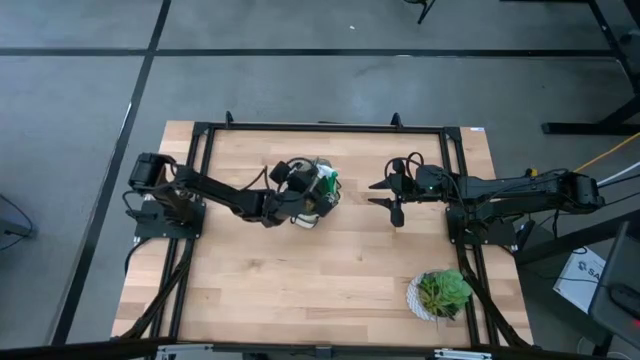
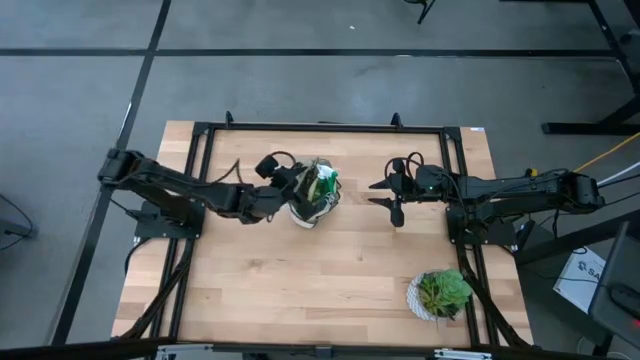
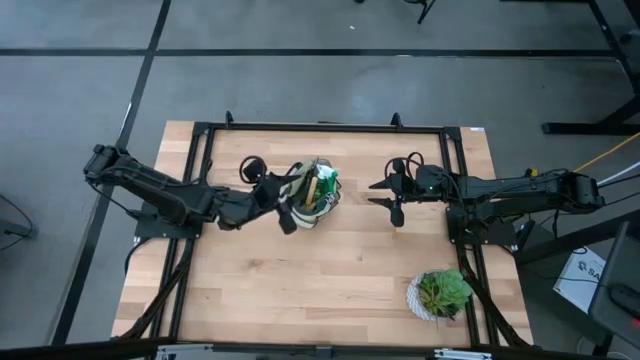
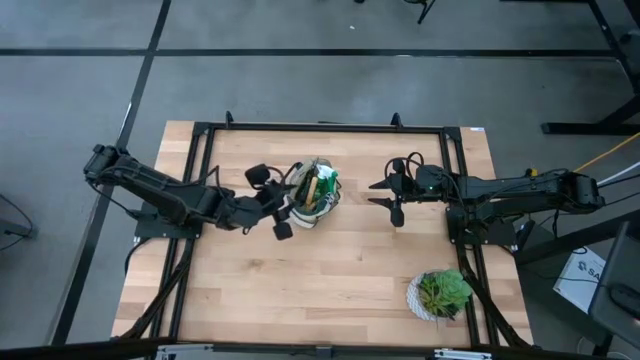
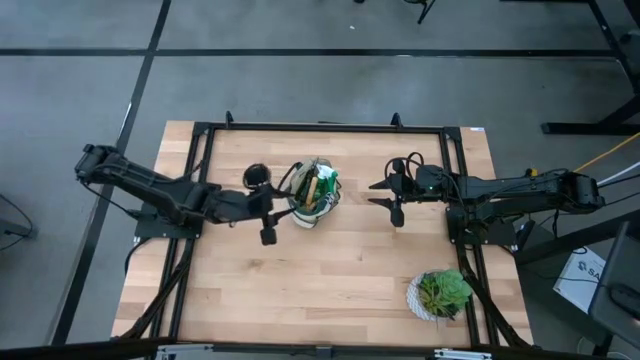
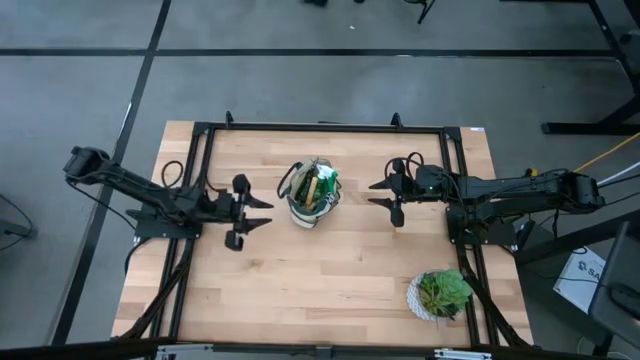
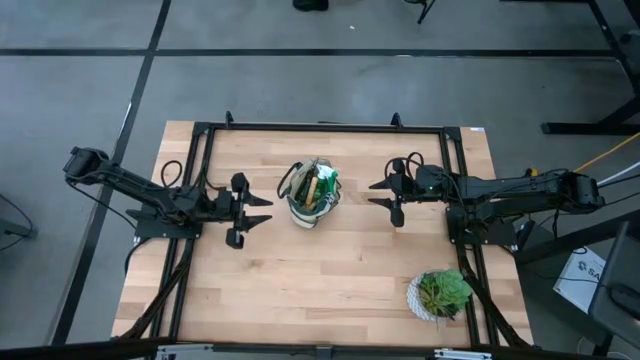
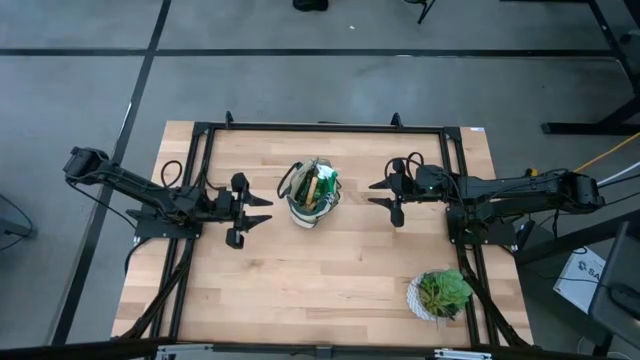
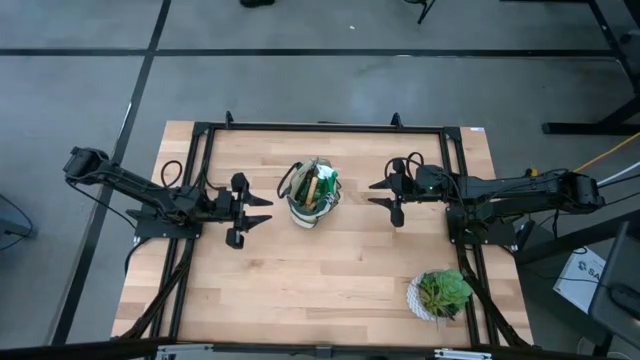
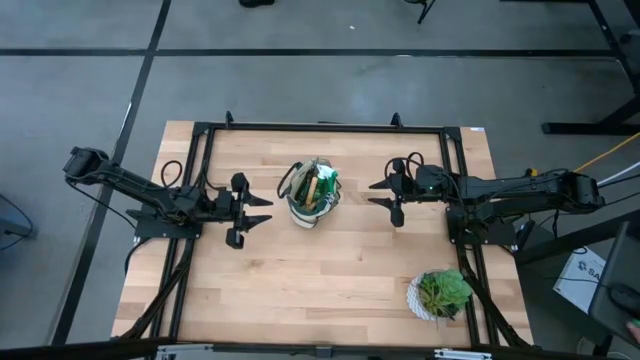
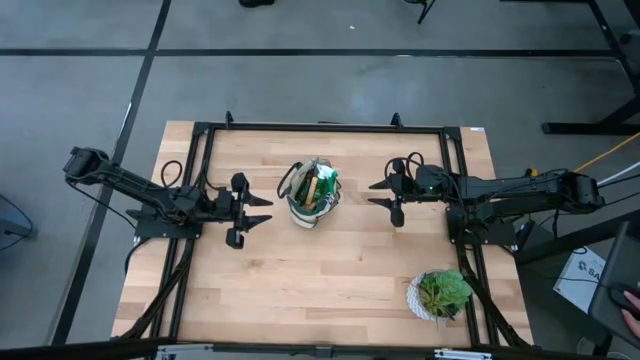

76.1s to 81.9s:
Task: Pick & Place Garden tools in Gardening bag
Return to Home Position

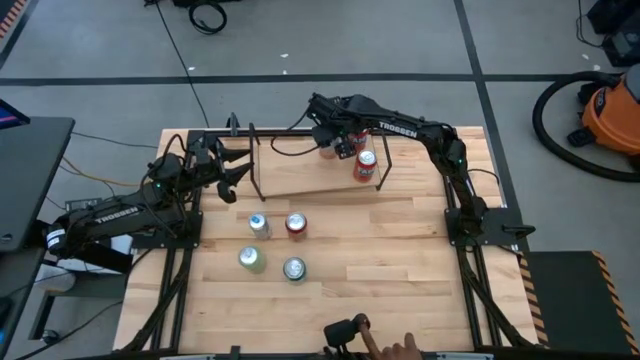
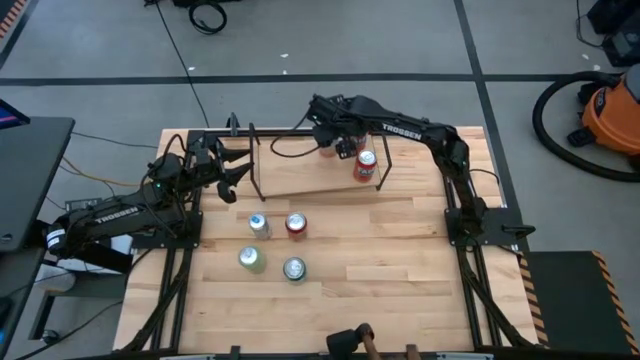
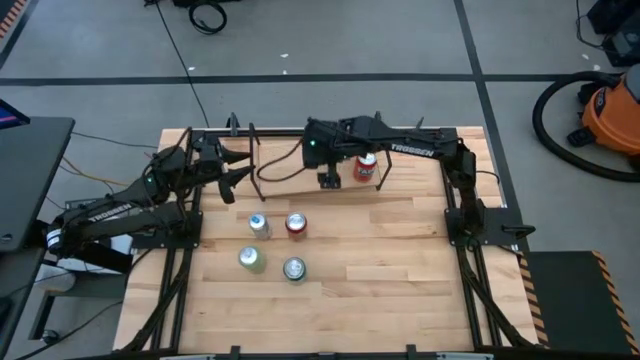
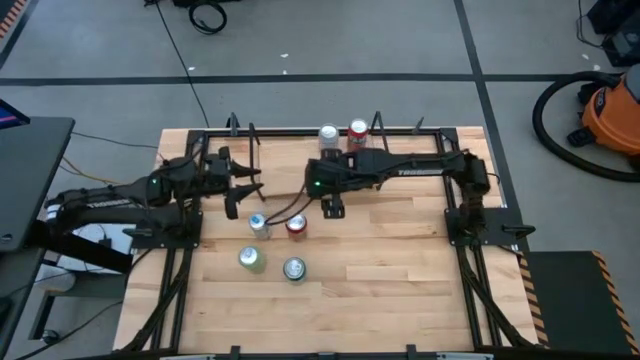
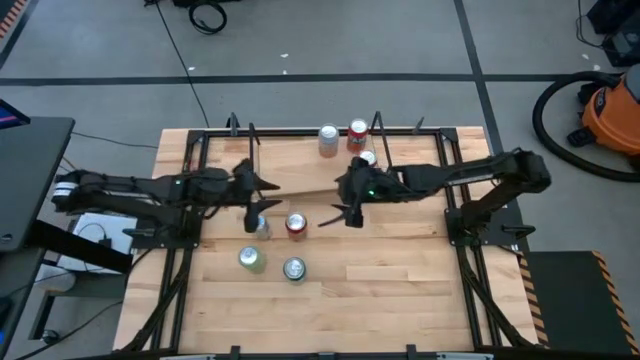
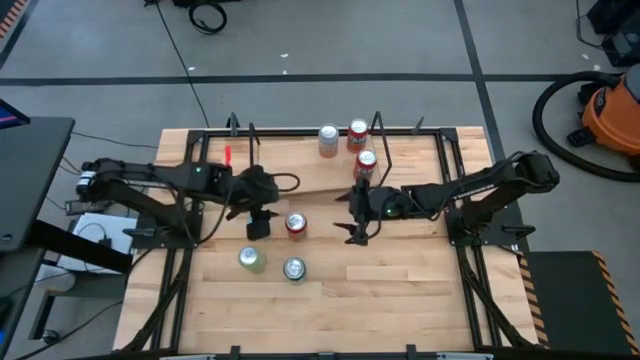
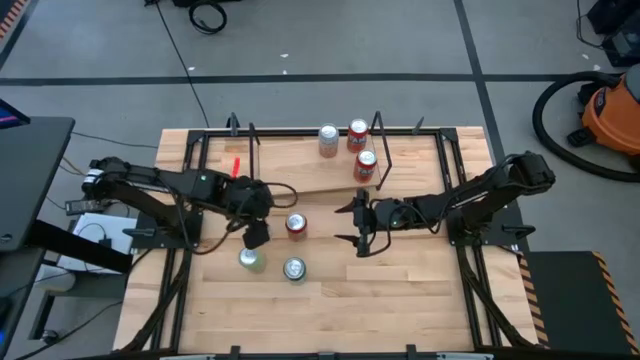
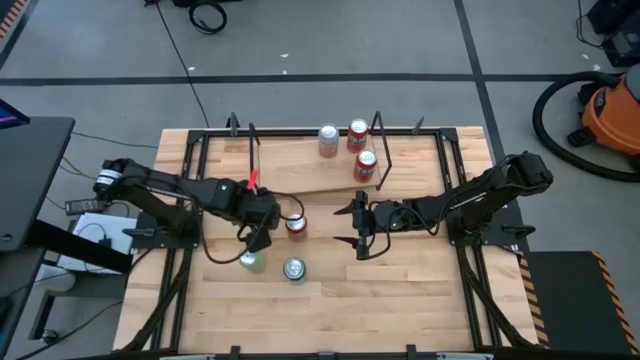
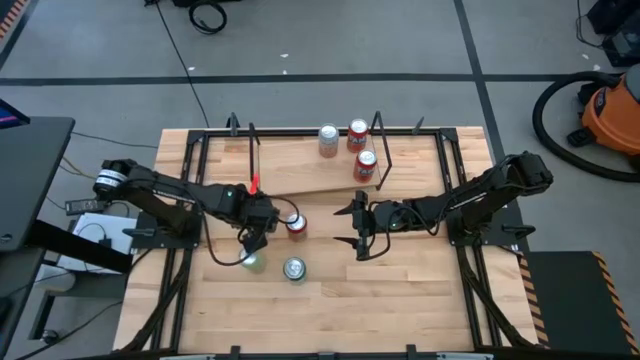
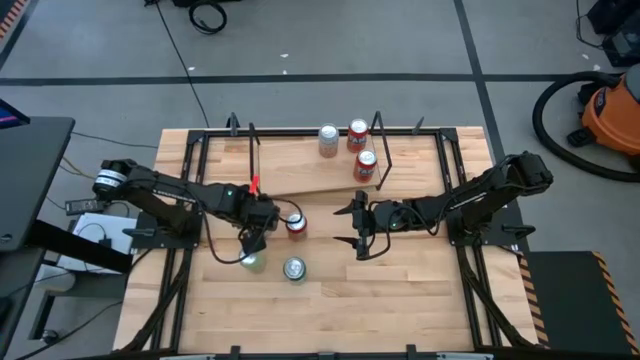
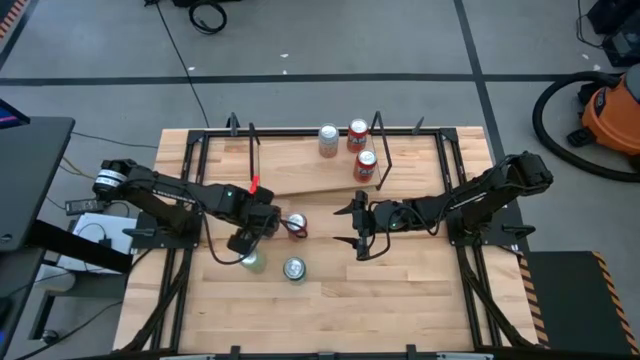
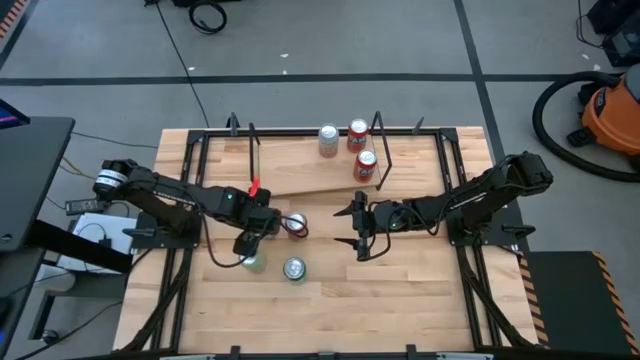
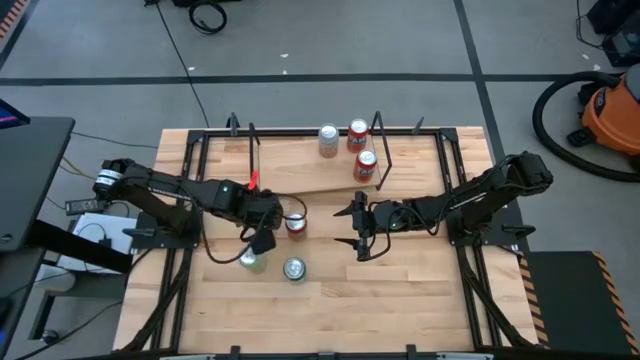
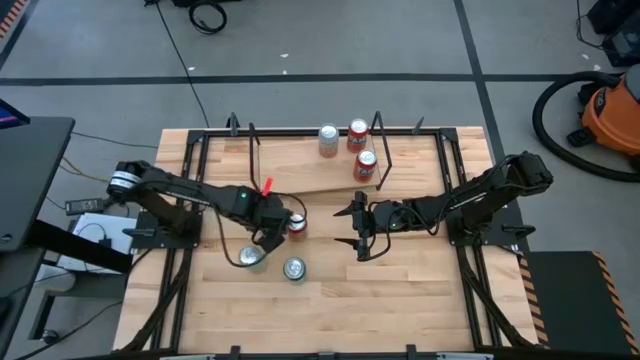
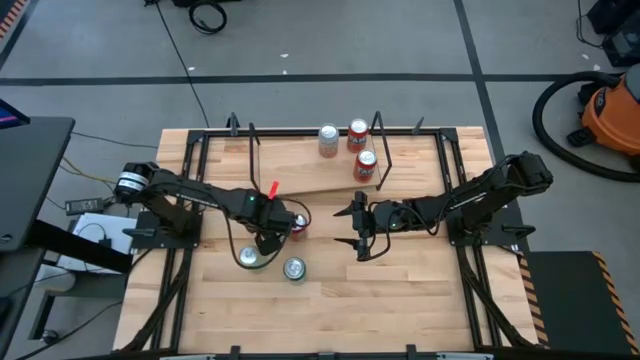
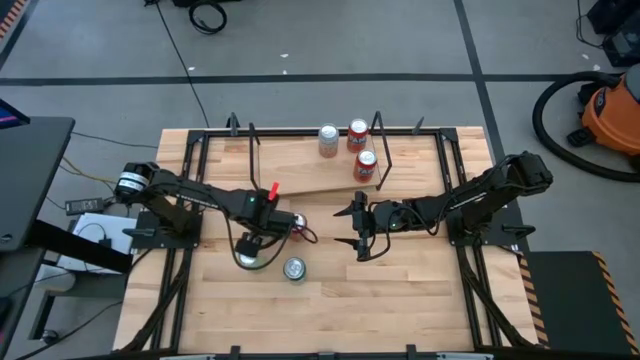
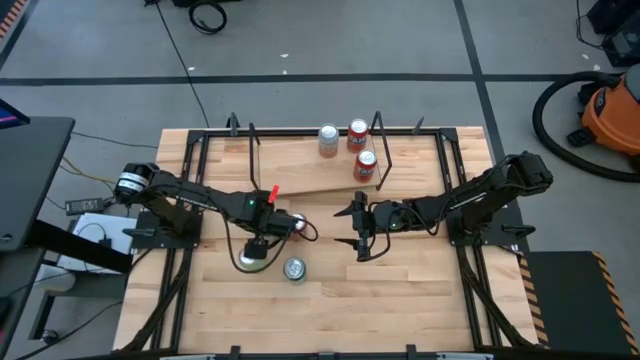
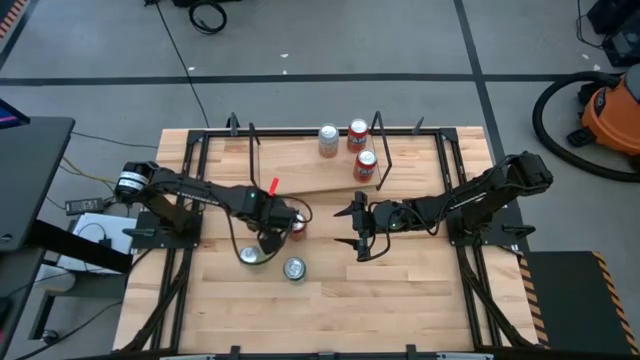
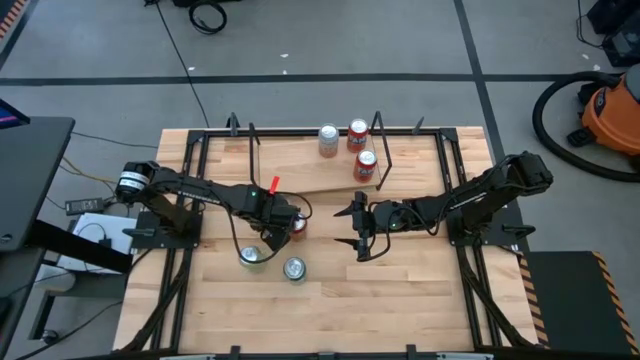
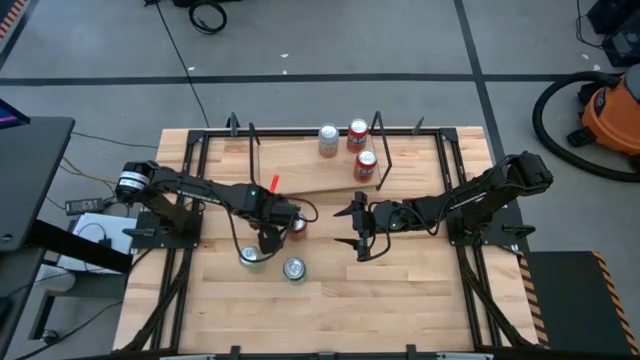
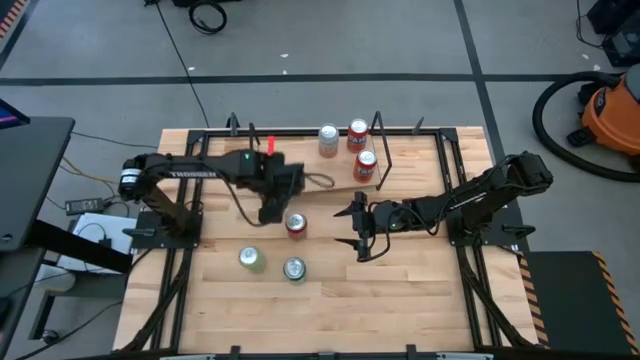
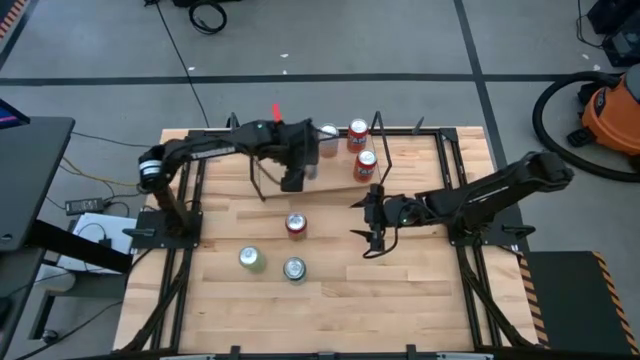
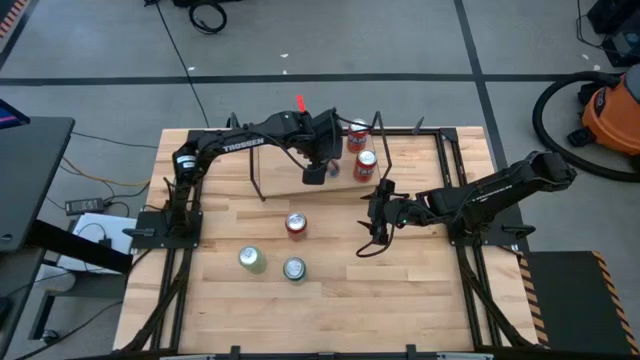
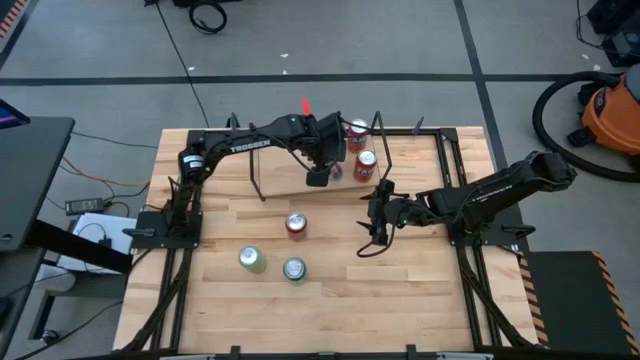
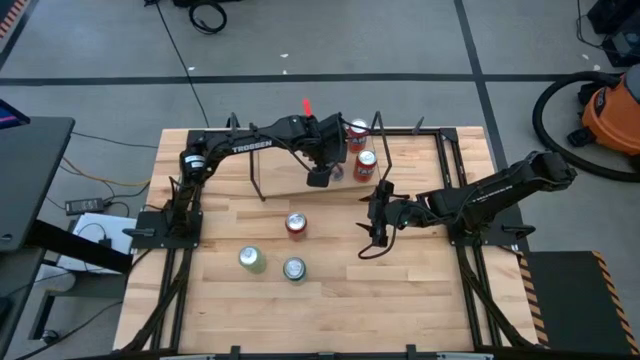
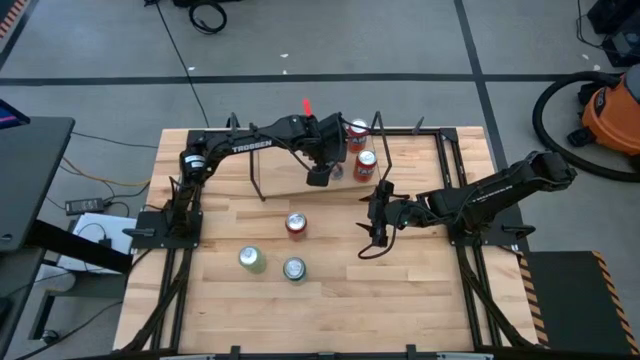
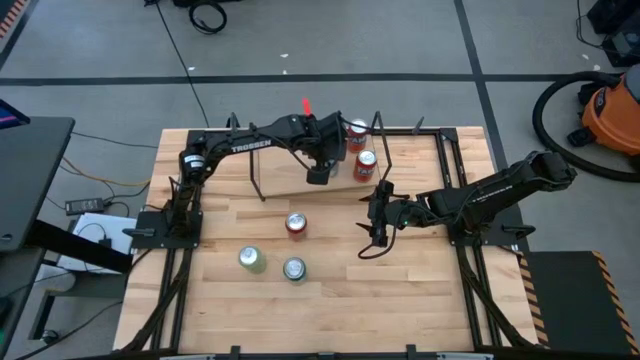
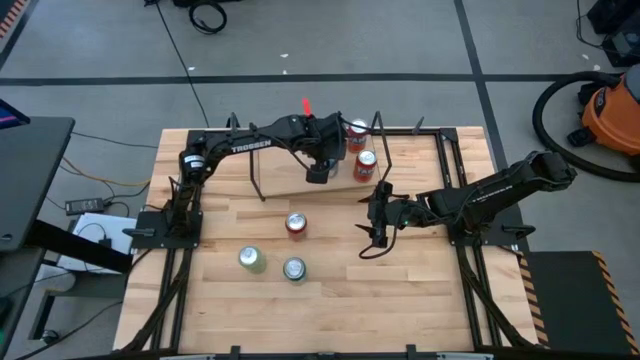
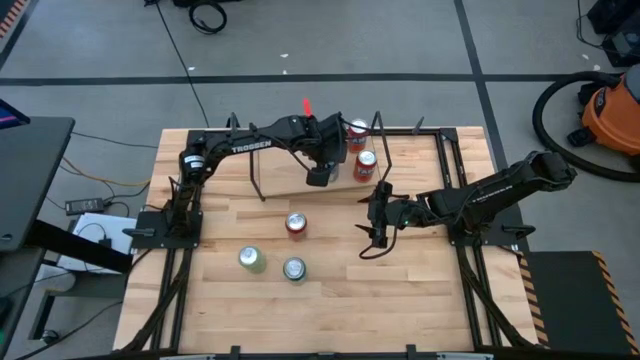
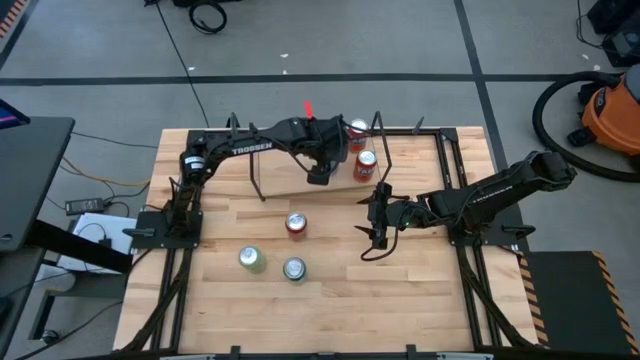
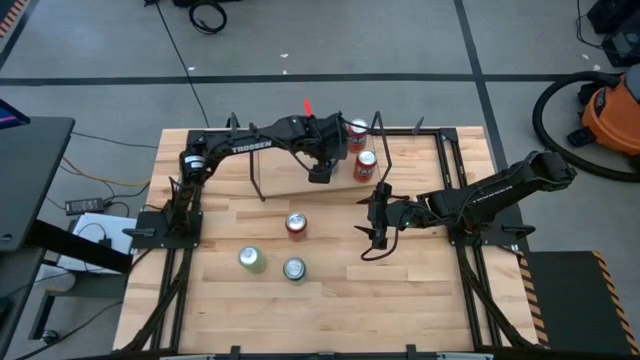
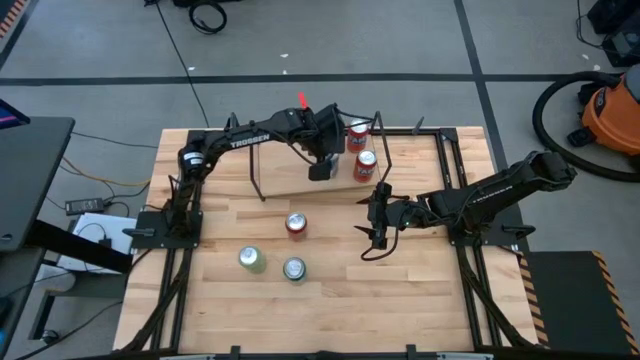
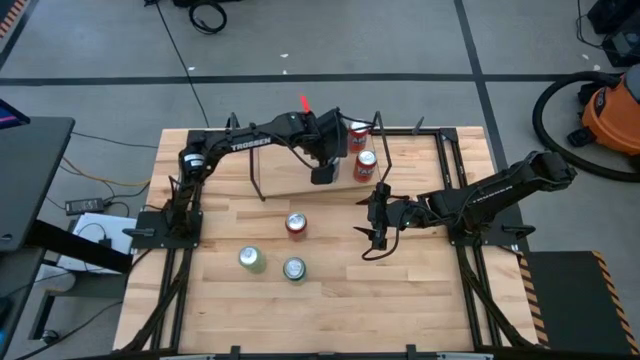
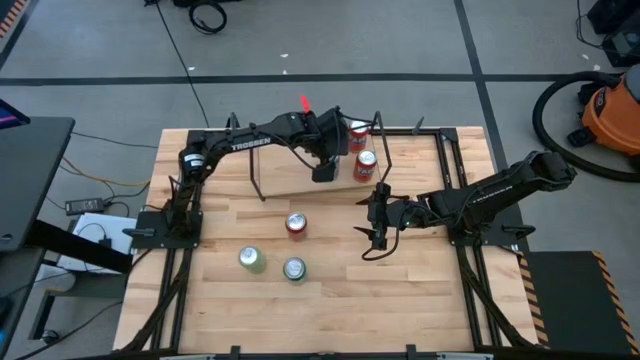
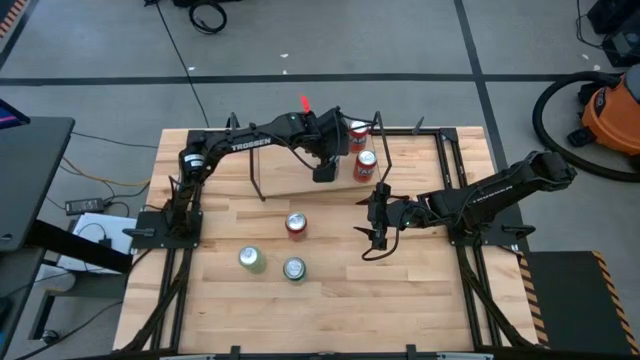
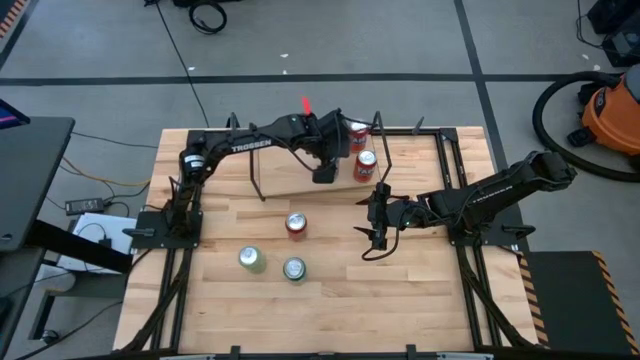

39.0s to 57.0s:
Task: Place canned beverage on shelf
Put the blue soda can on the shelf aligned with the orange-white soda can
